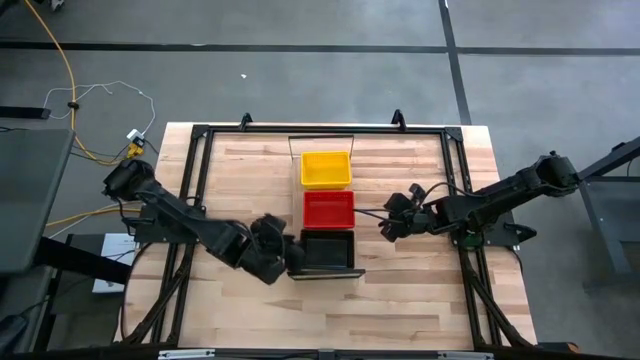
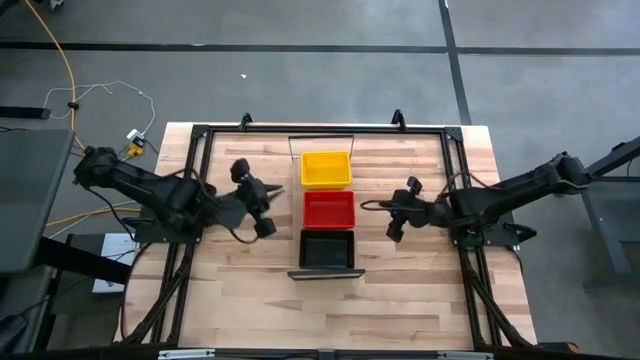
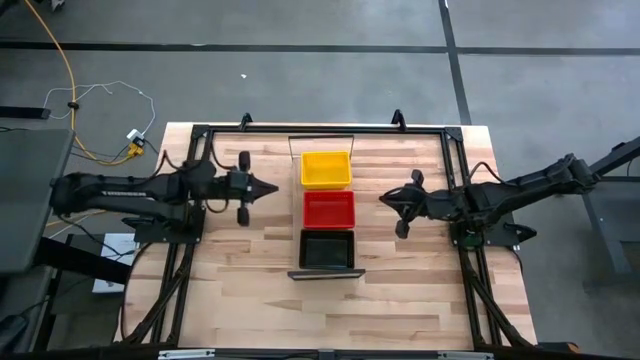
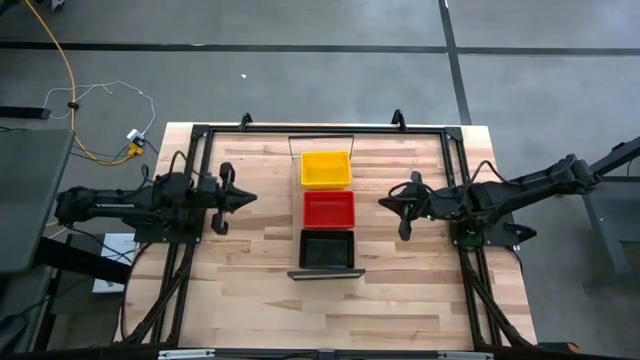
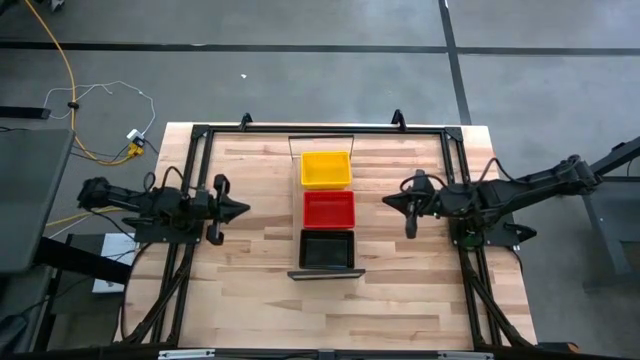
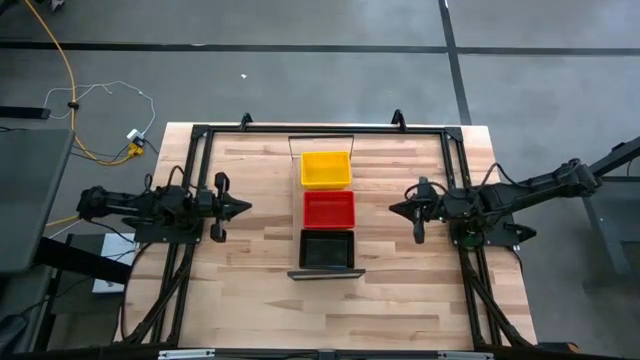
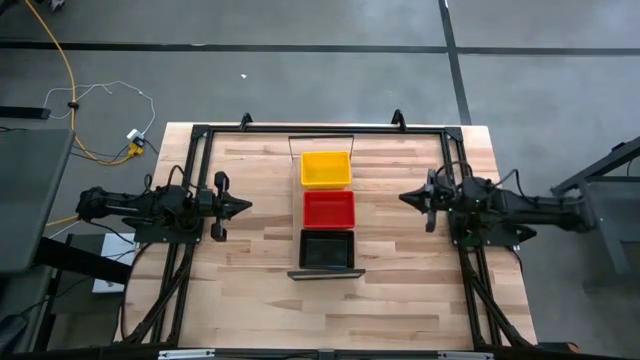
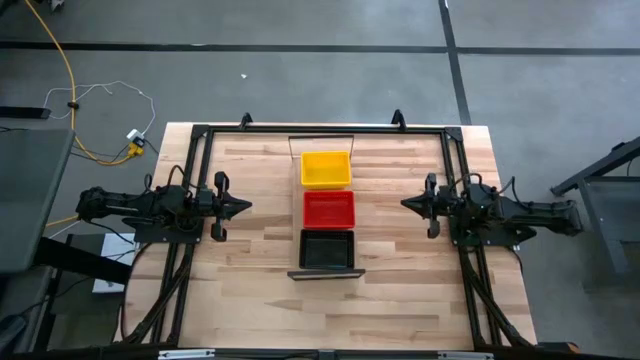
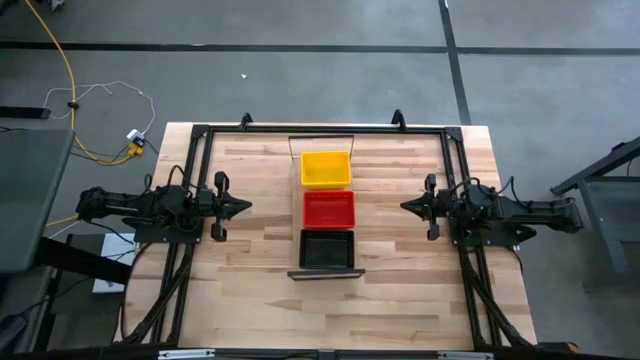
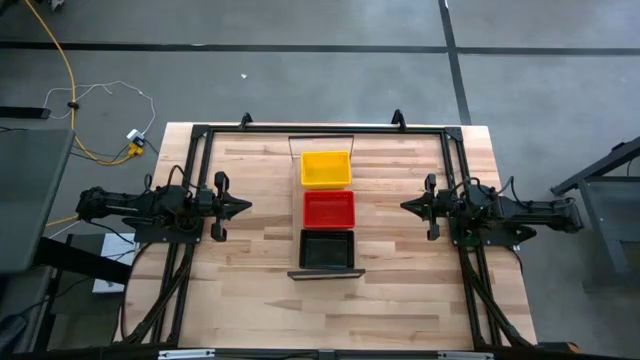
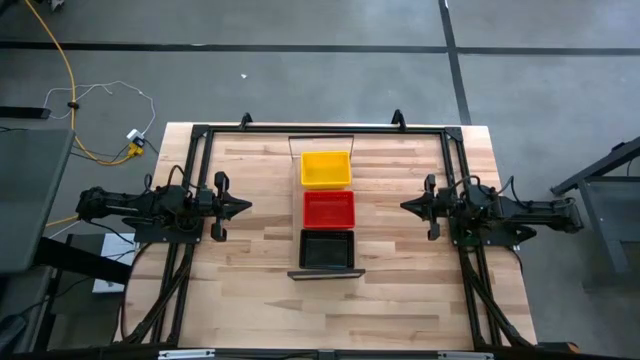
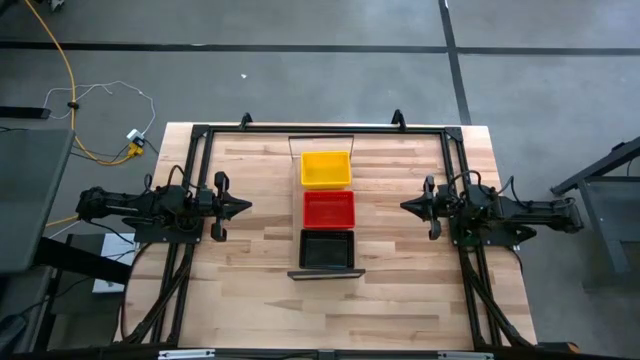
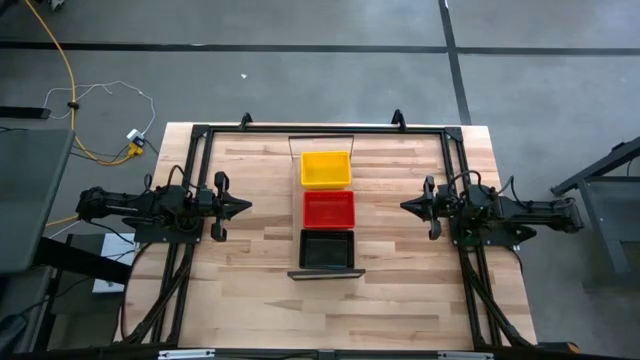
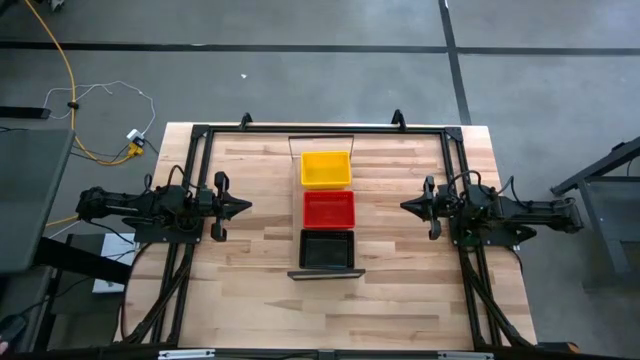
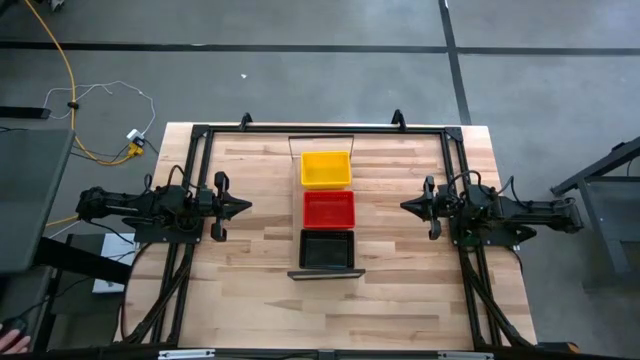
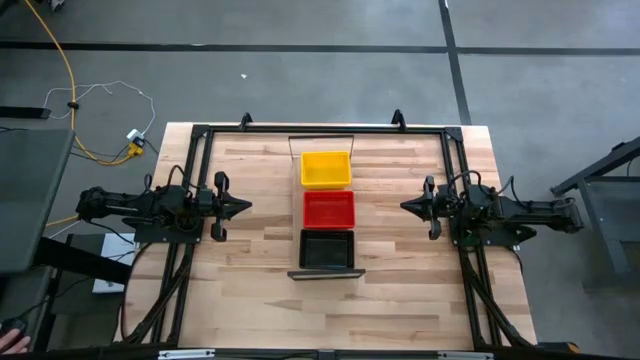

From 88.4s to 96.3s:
Task: Stack baskets on shelf by color
Return to Home Position

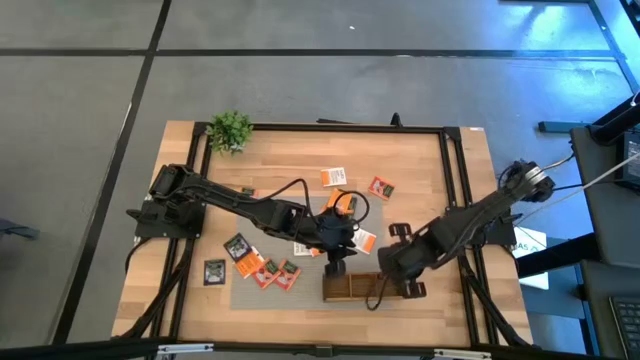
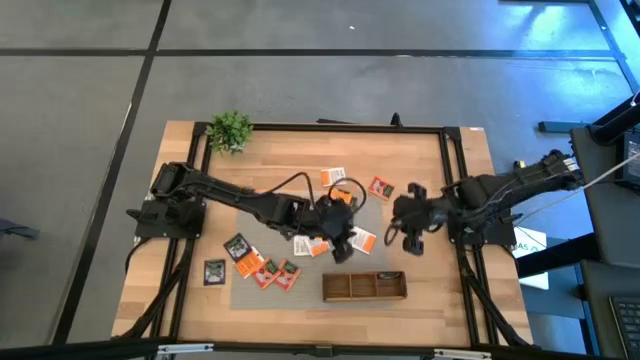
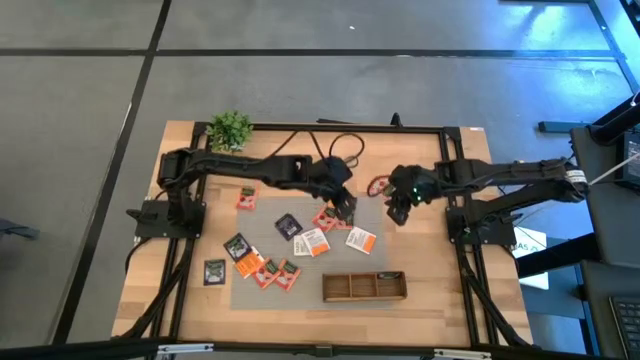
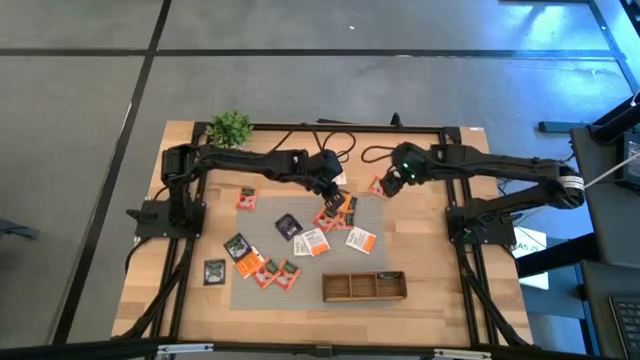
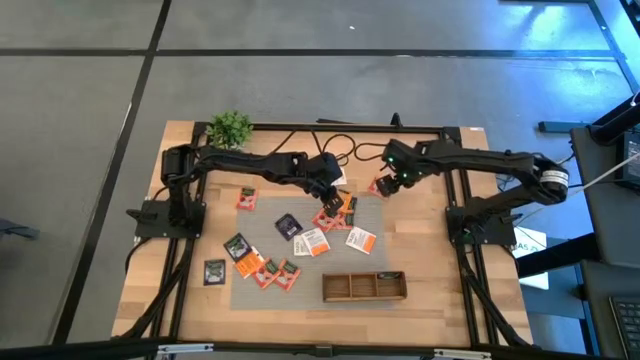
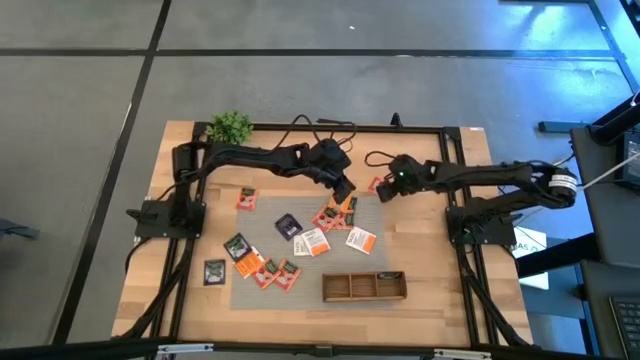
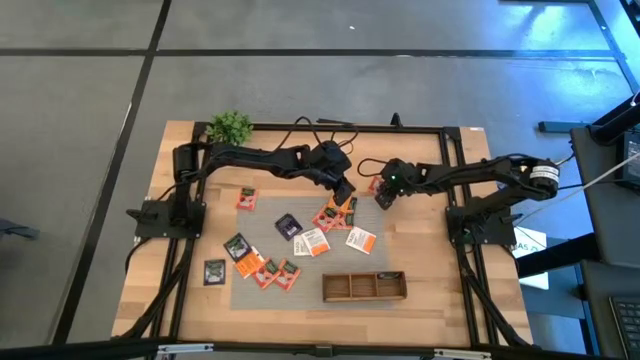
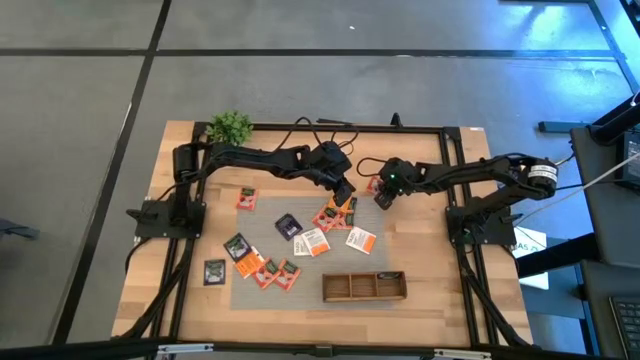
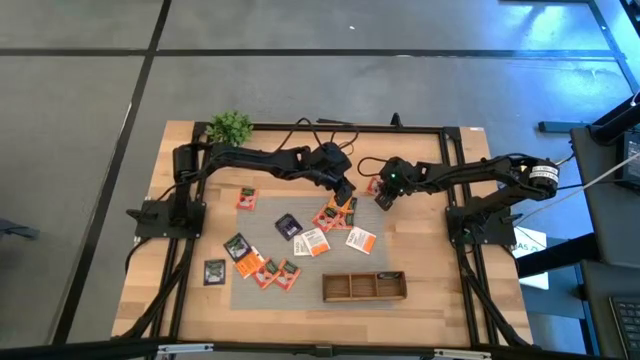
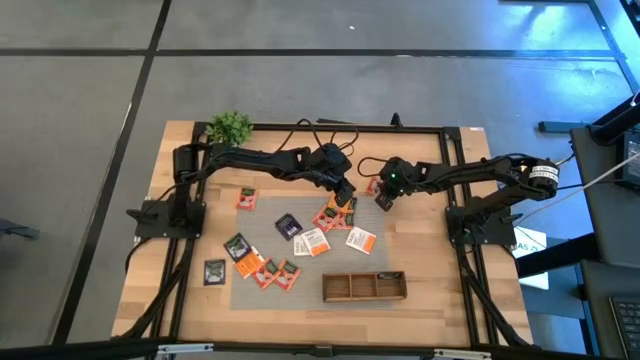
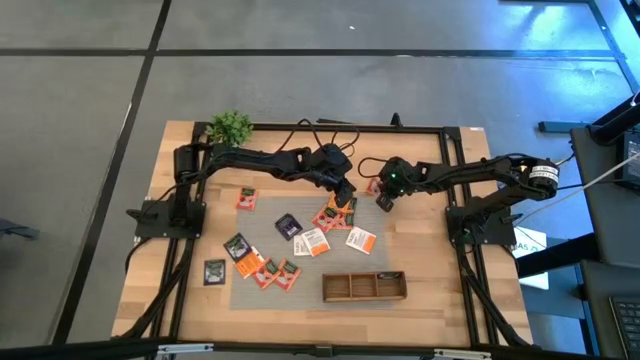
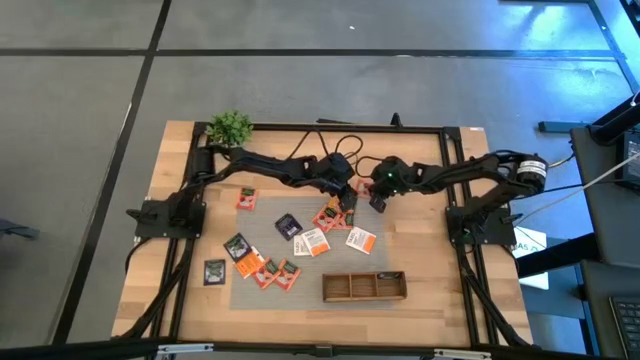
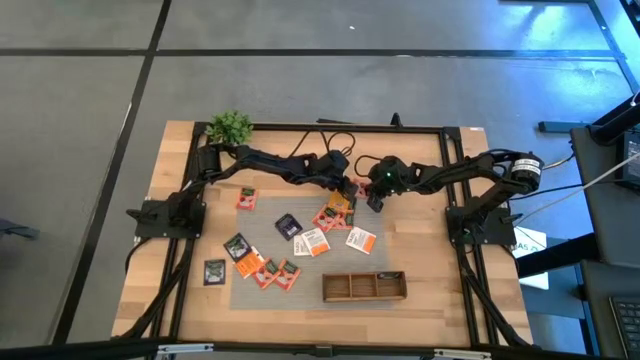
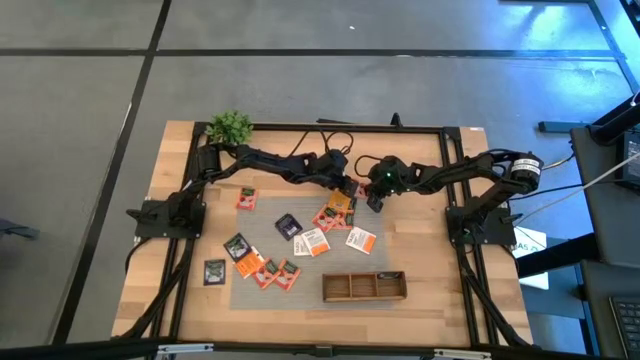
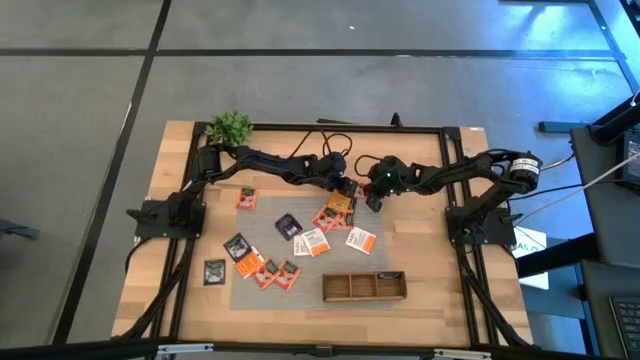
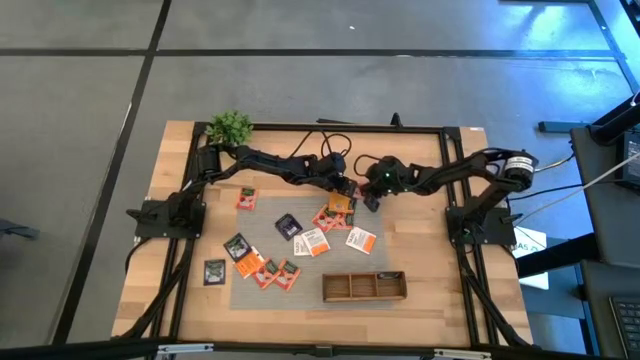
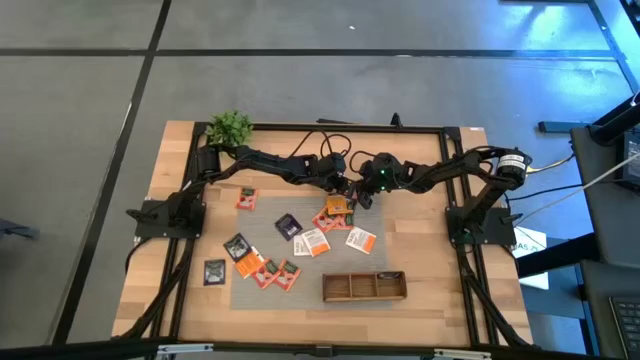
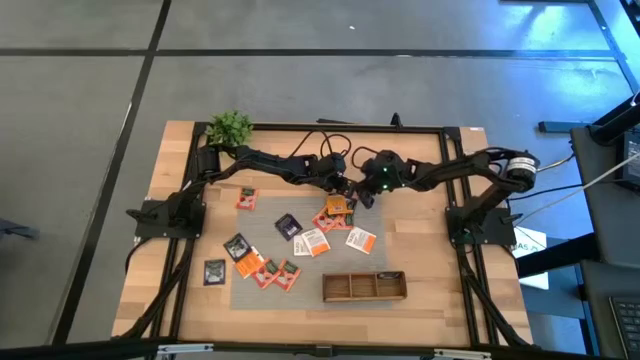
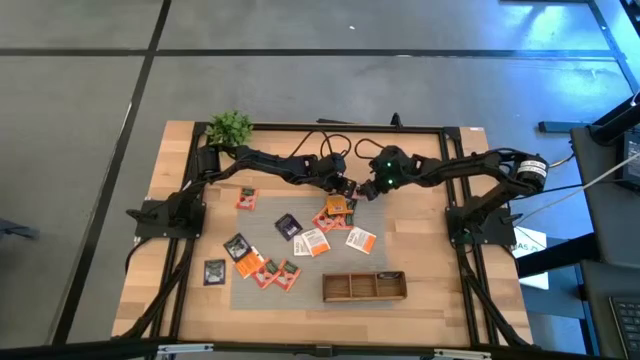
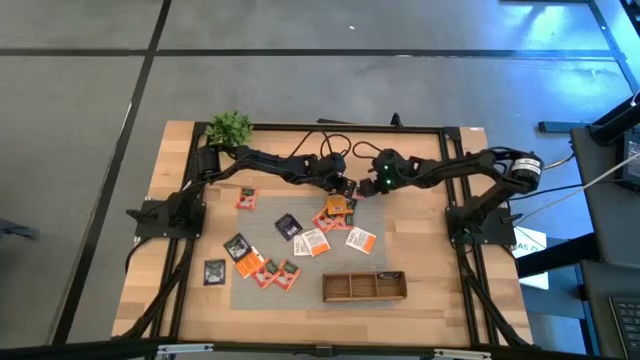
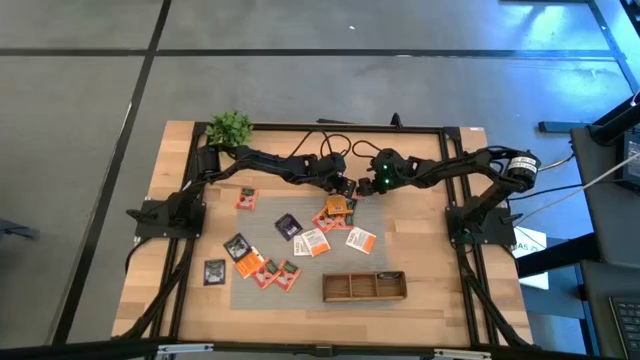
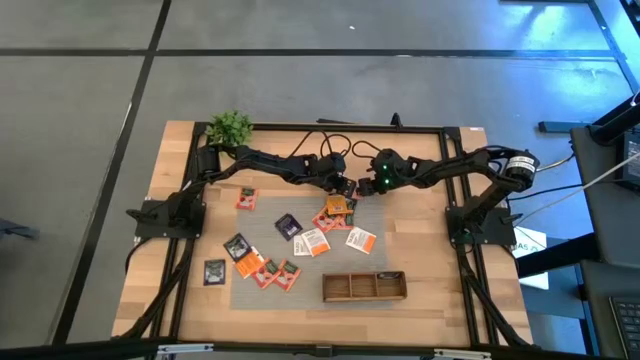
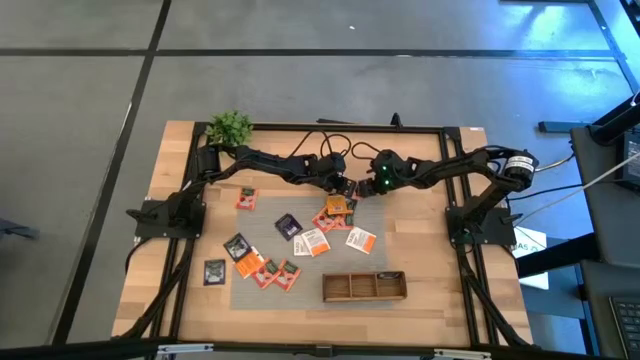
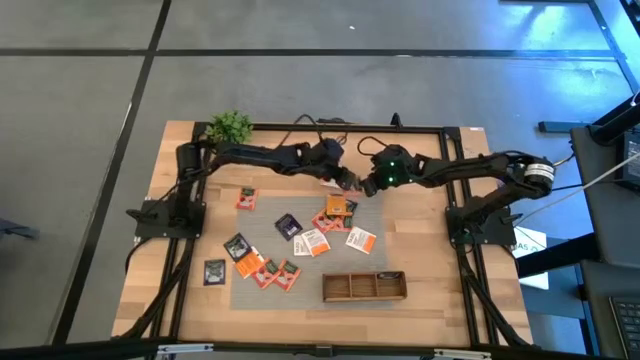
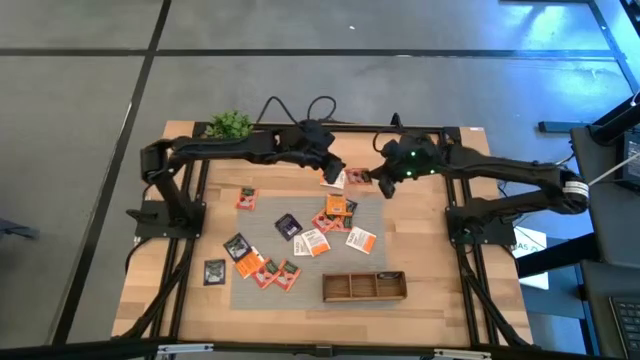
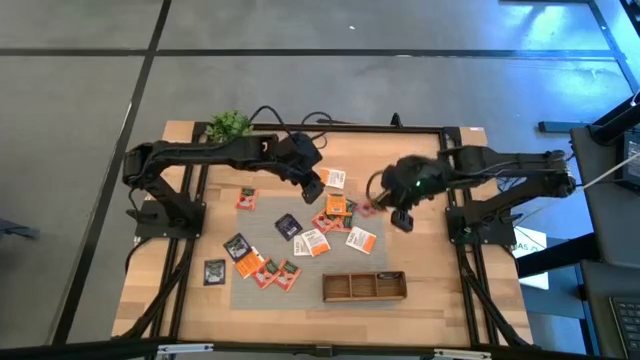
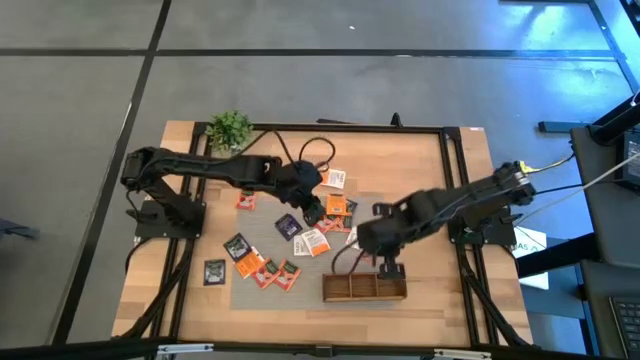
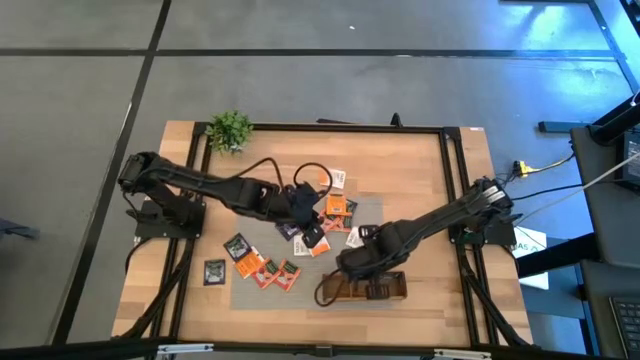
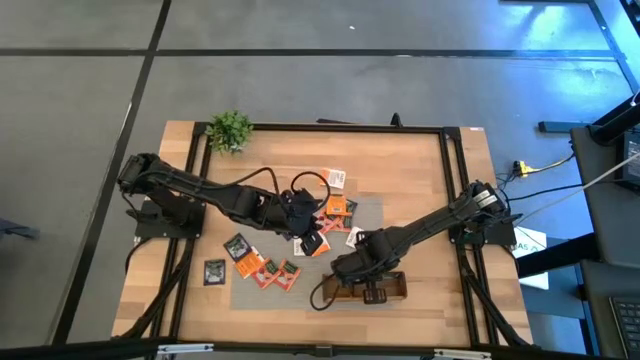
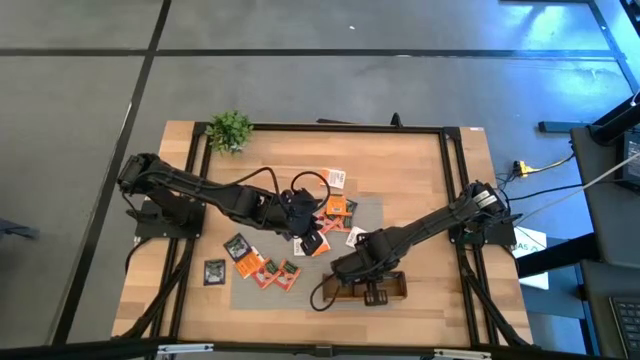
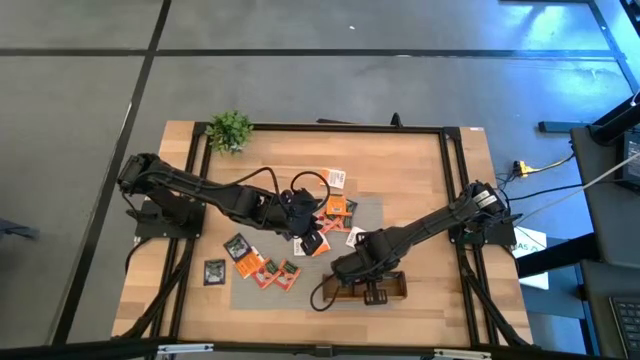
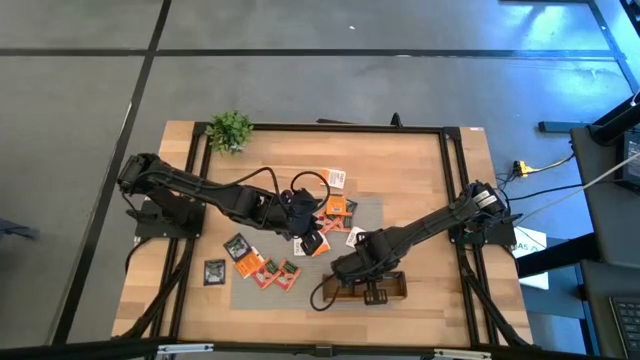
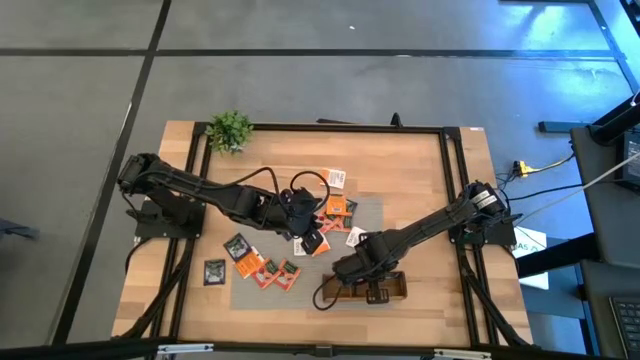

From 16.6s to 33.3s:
Task: Pick & Place Tea
Put the yellow tea bag into the middle compartment of the wooden organizer
